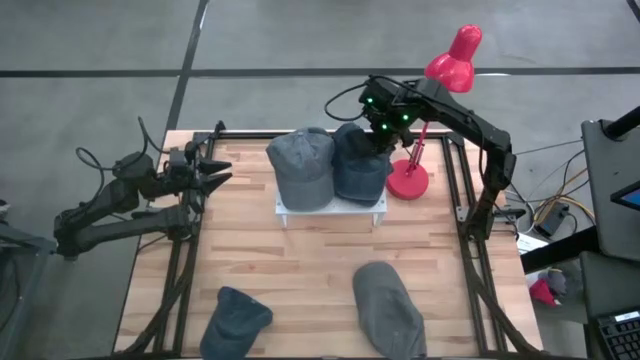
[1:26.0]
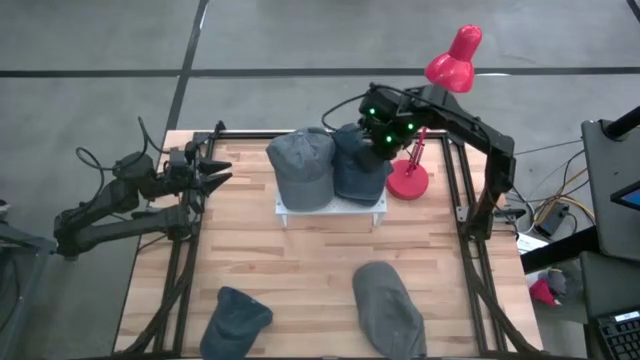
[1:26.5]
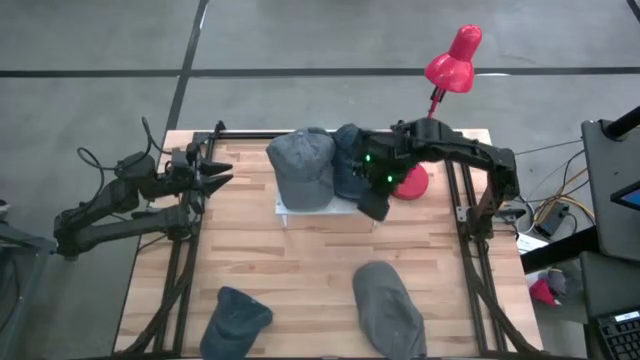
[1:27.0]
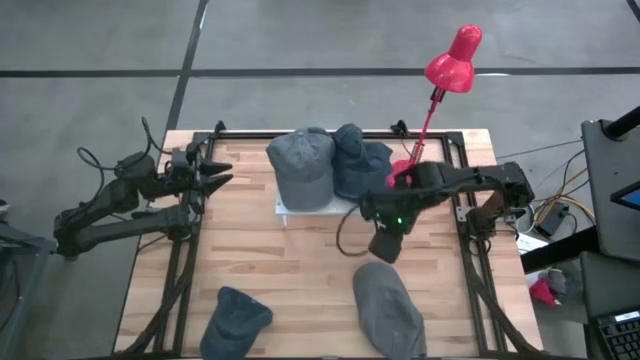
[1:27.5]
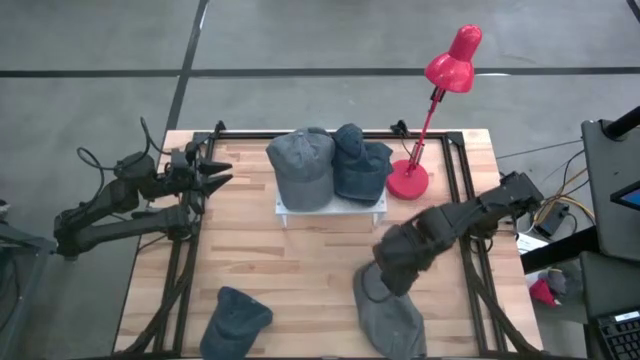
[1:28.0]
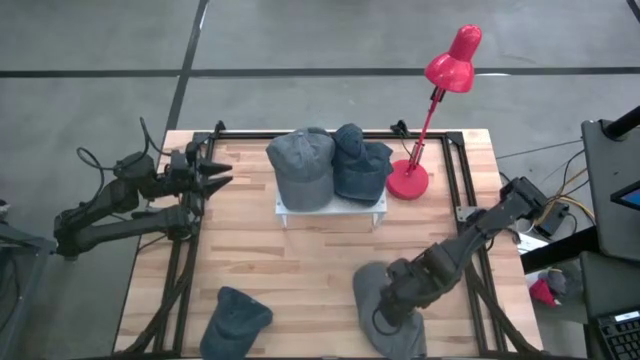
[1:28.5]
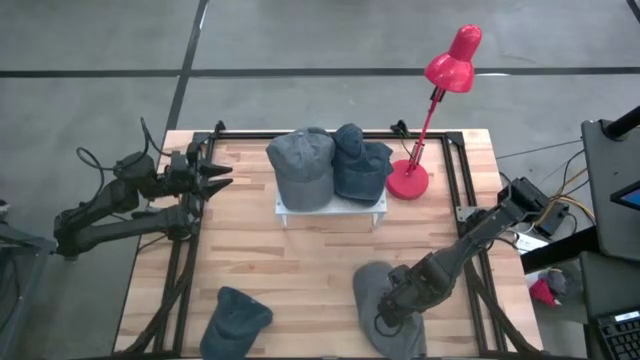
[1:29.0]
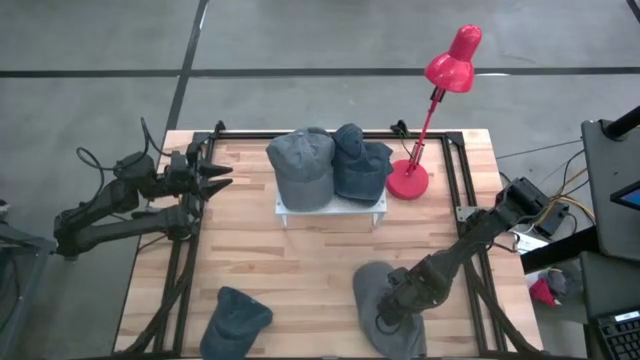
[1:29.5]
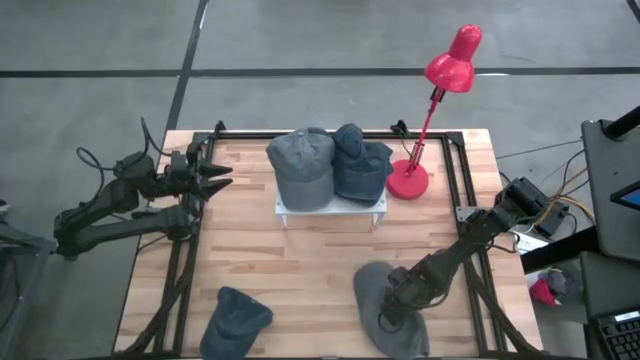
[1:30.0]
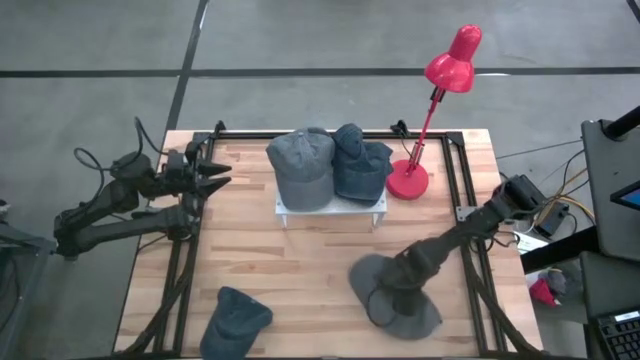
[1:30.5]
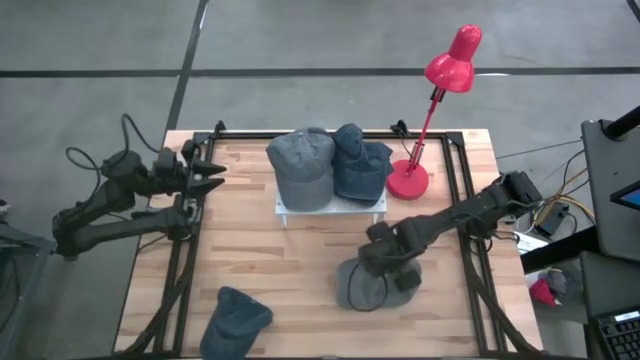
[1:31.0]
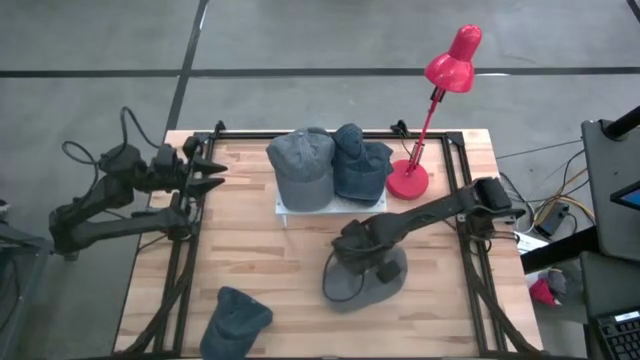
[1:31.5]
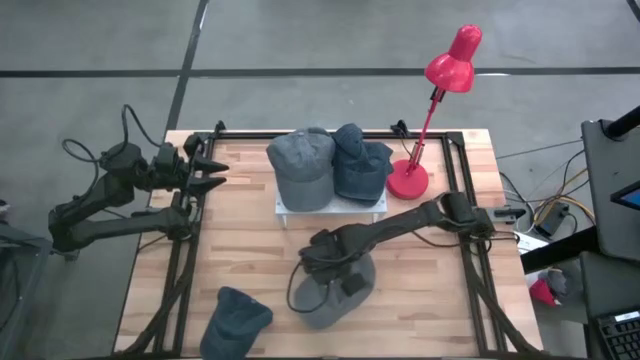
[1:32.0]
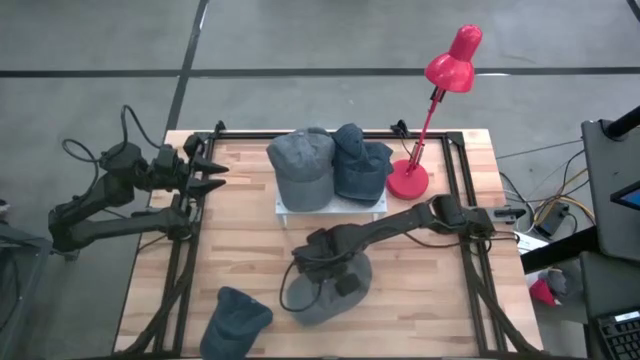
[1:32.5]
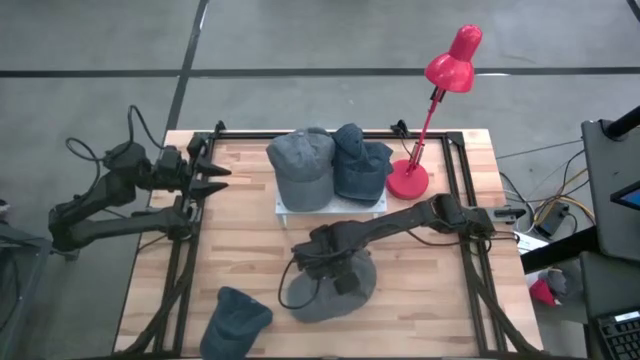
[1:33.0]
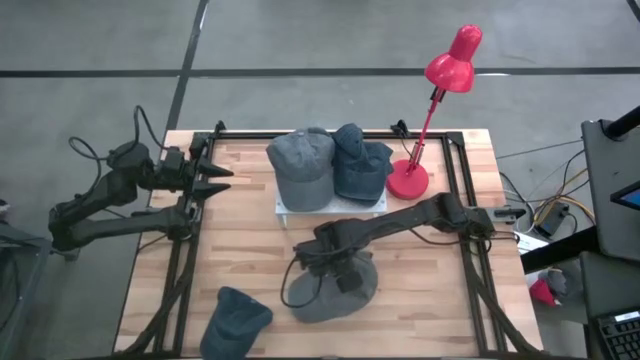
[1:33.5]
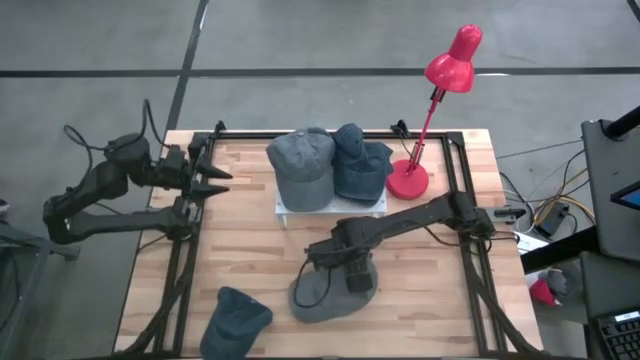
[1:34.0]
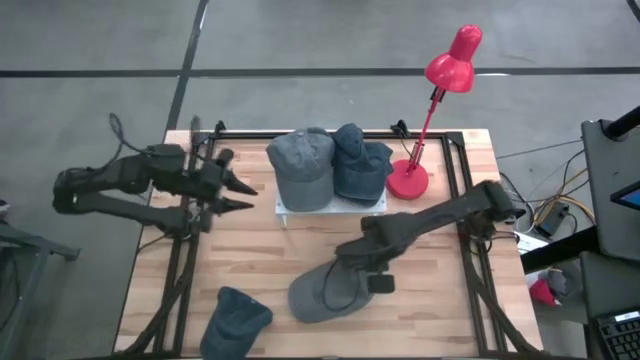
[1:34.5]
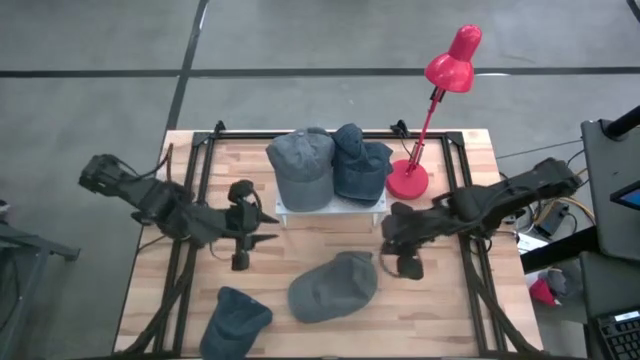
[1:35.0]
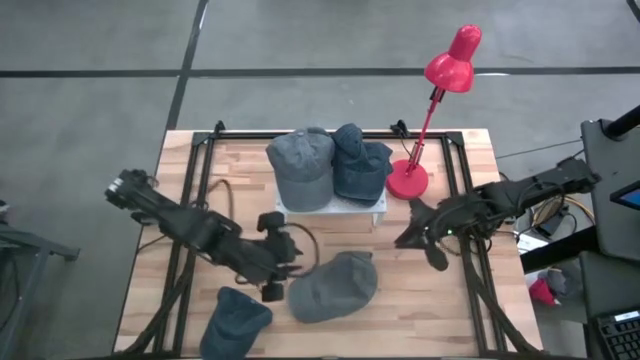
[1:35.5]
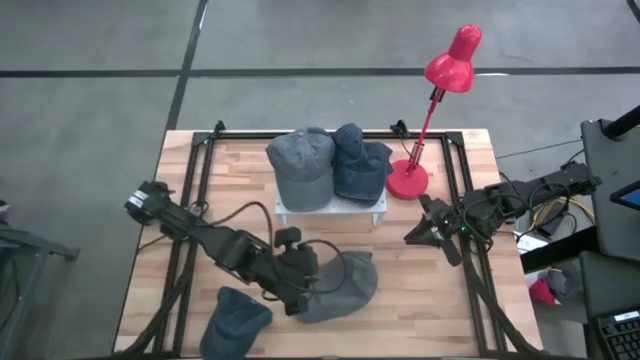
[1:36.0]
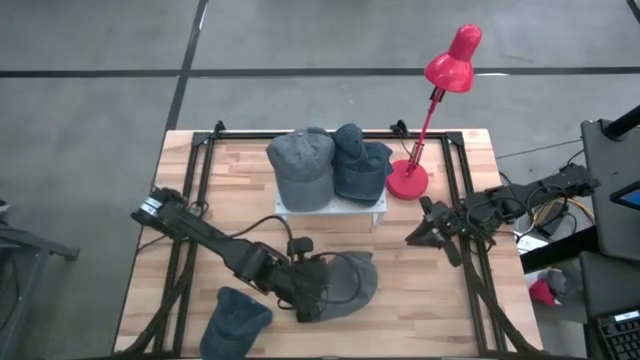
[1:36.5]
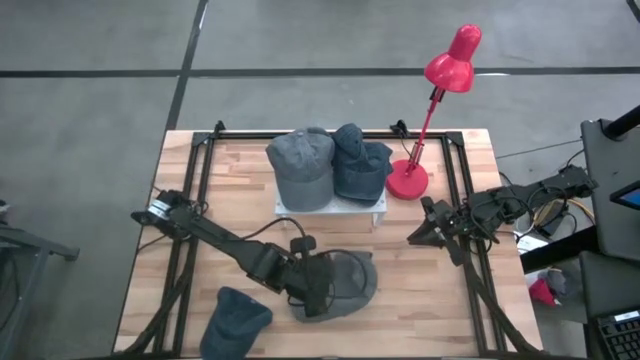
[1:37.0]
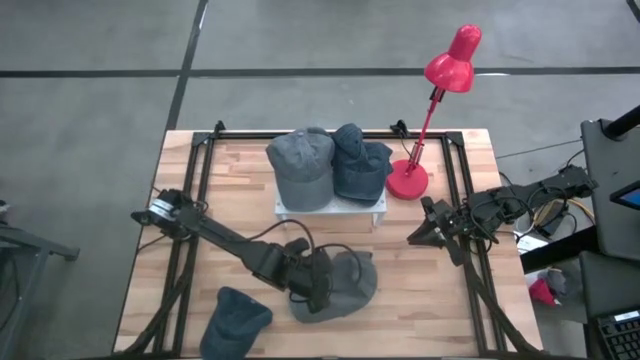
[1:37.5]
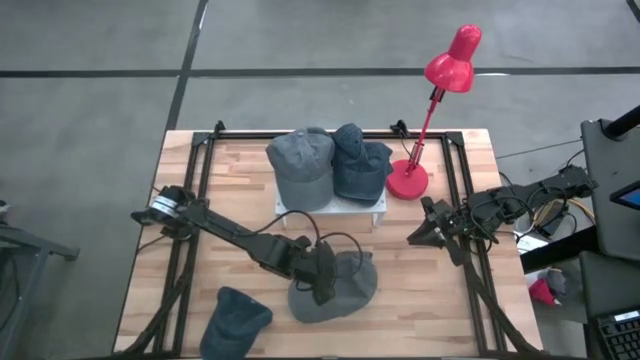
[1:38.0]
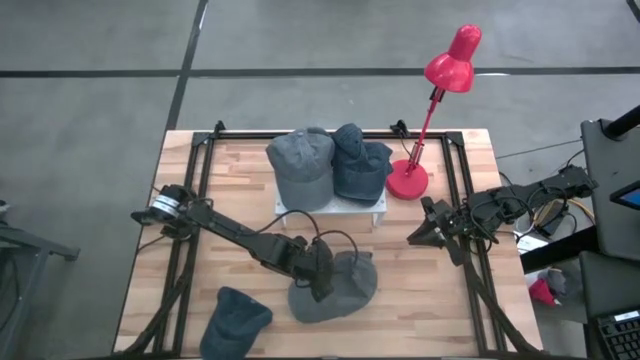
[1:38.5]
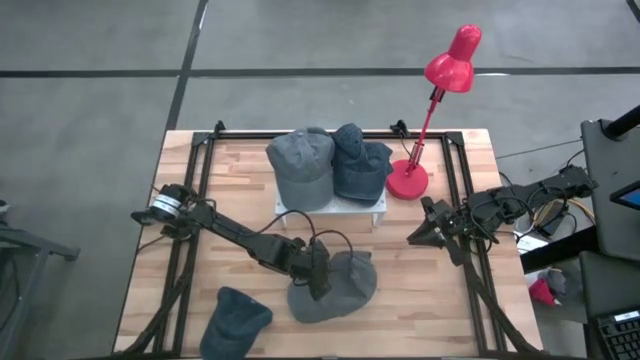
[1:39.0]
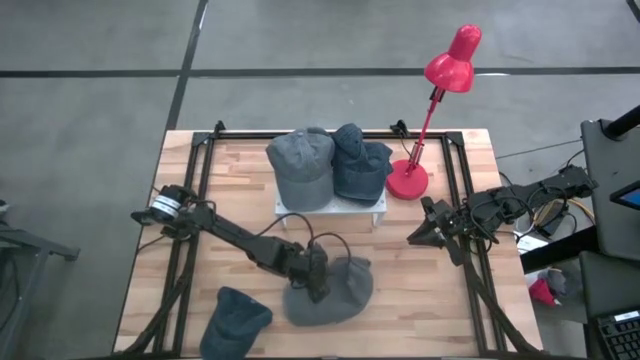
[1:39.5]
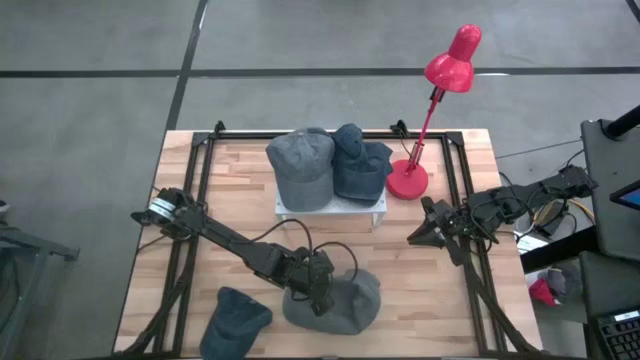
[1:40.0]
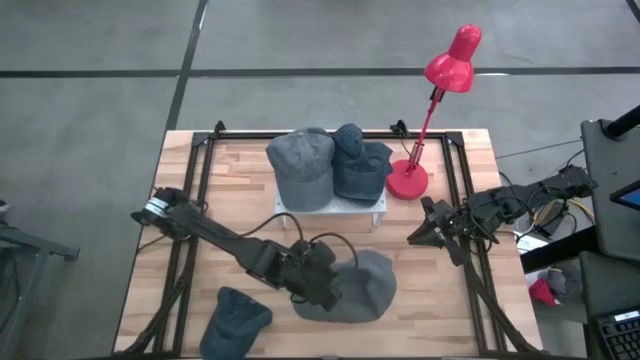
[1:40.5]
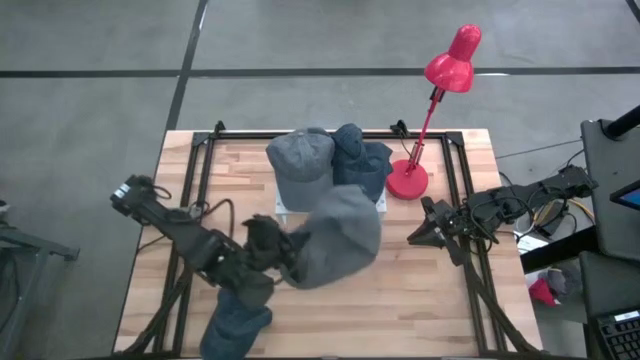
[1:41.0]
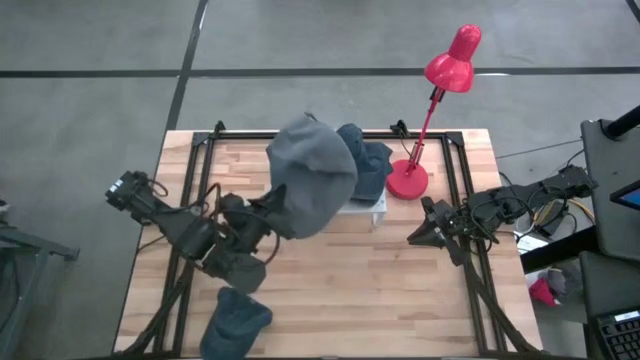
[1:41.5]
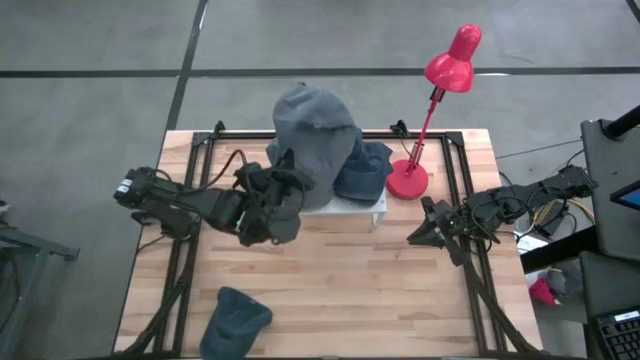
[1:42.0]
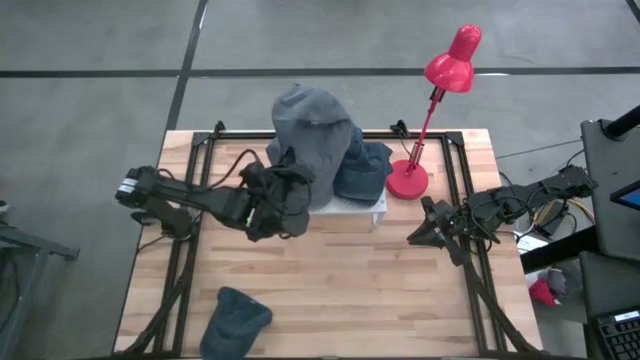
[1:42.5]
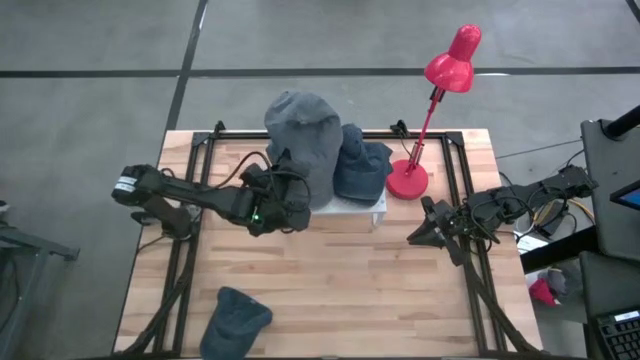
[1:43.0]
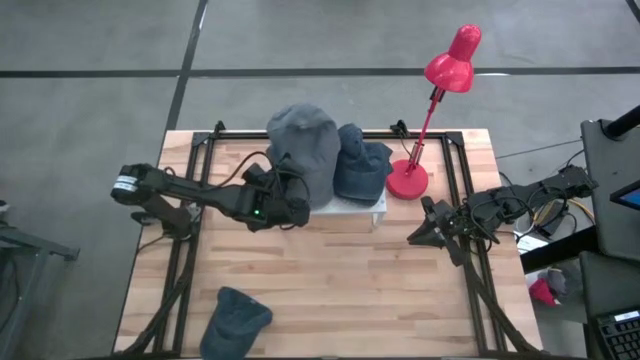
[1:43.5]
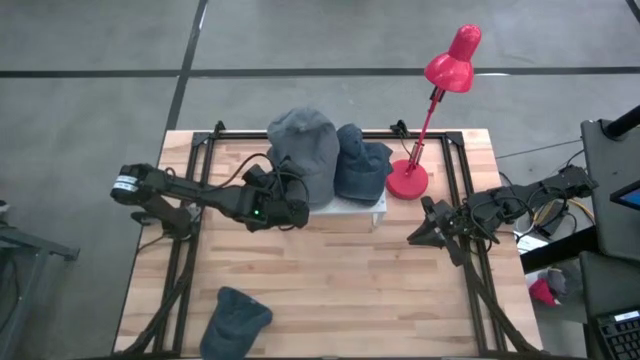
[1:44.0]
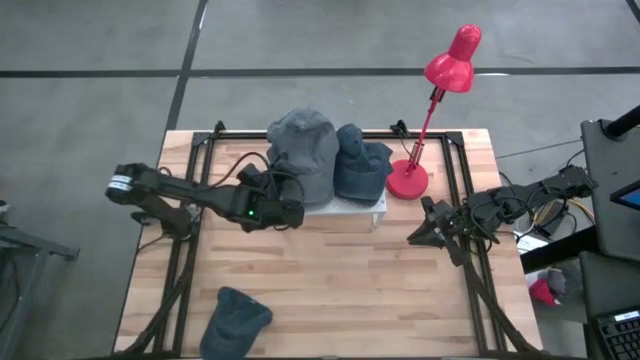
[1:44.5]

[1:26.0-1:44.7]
Task: Pick & Place hat
Stack the gray cap on the gray caps on the shelf

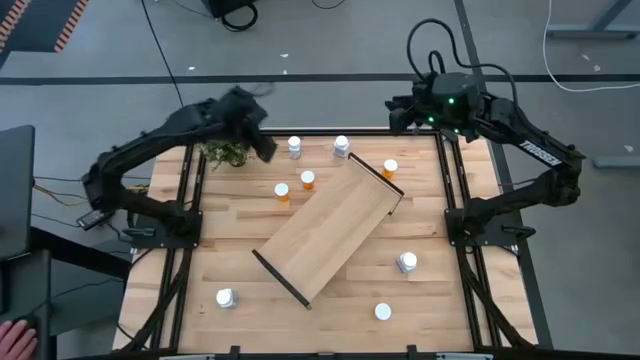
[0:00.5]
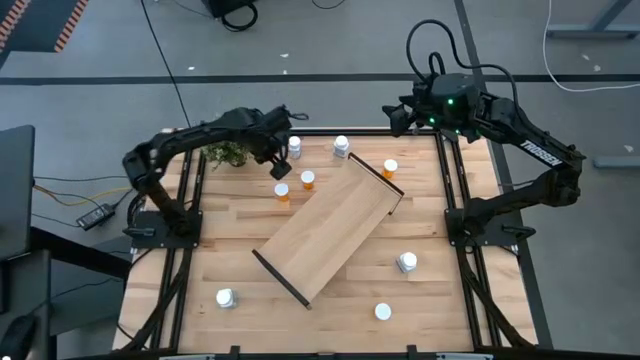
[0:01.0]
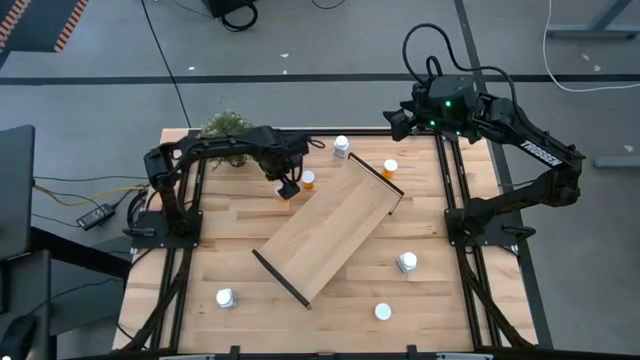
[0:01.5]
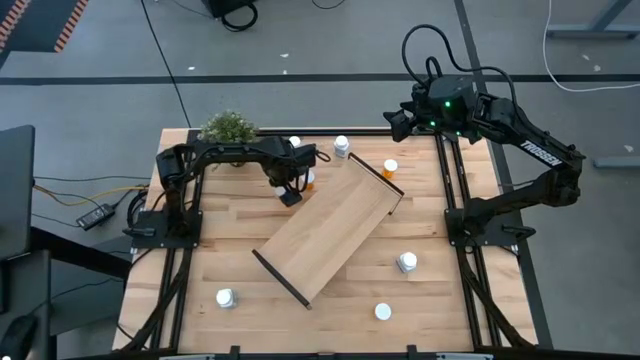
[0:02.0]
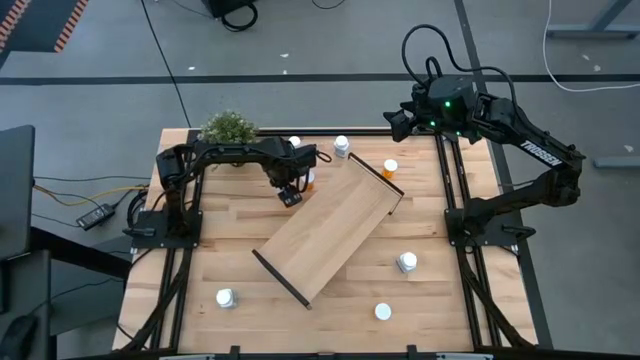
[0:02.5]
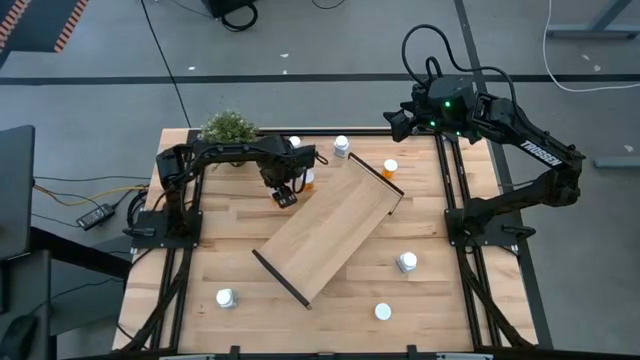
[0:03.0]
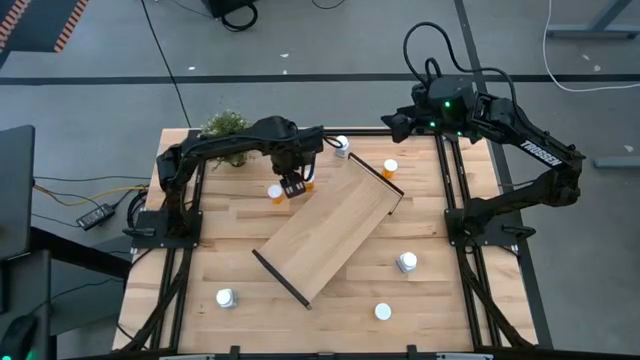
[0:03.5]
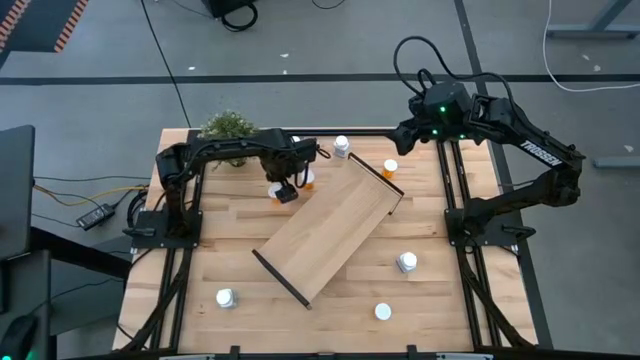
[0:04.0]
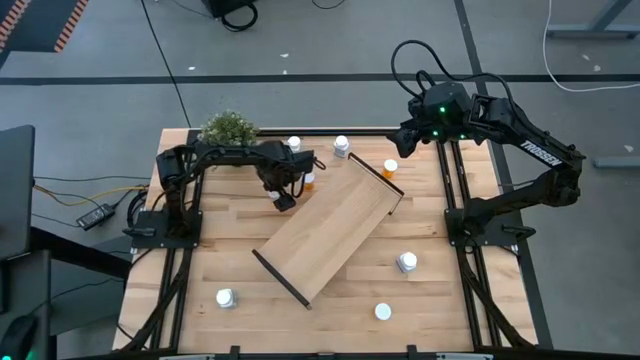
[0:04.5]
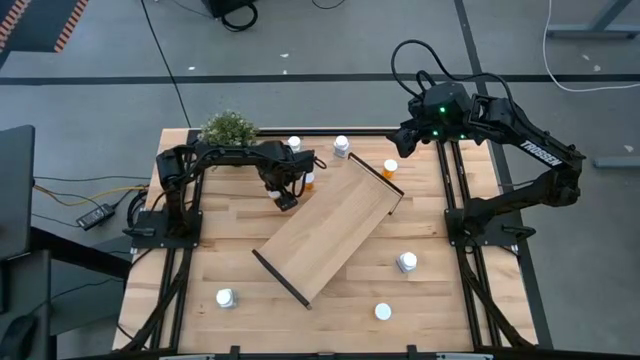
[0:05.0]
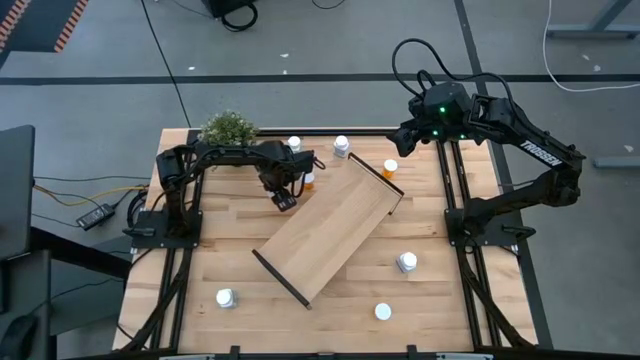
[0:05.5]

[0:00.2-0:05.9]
Task: Pick and place medicine bottles onto shelf by color
Put the left orange pill bottle on the shelf
